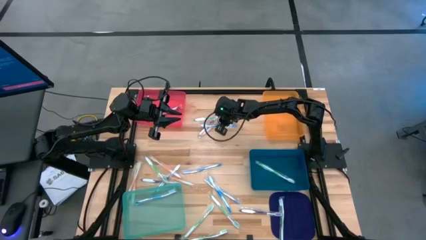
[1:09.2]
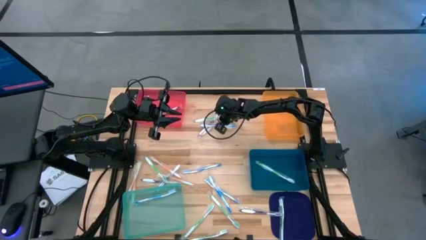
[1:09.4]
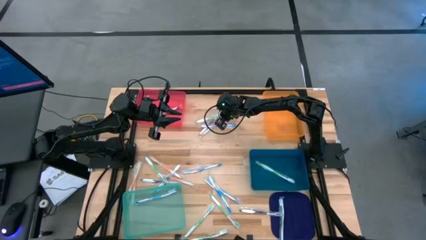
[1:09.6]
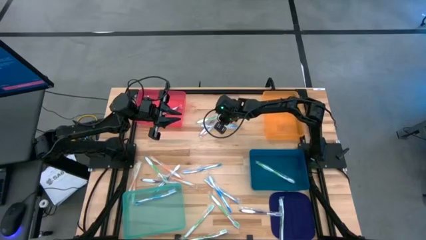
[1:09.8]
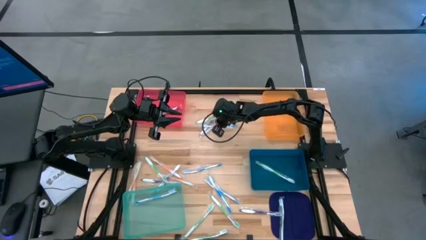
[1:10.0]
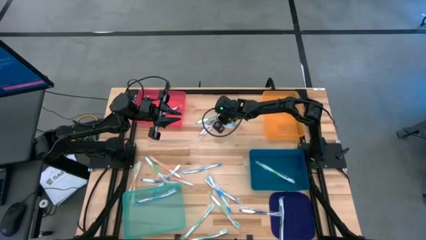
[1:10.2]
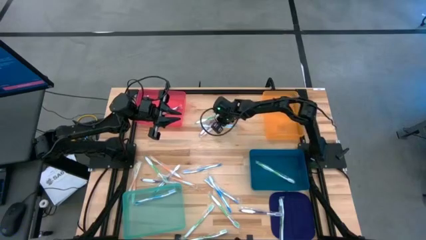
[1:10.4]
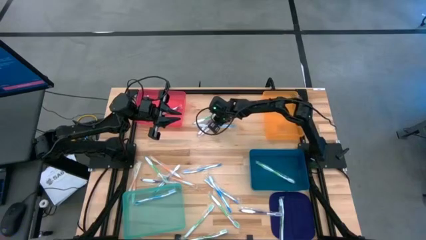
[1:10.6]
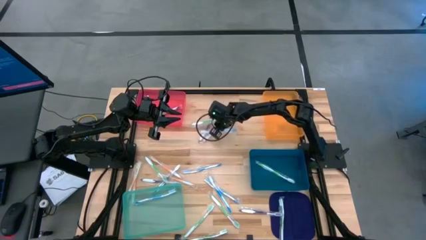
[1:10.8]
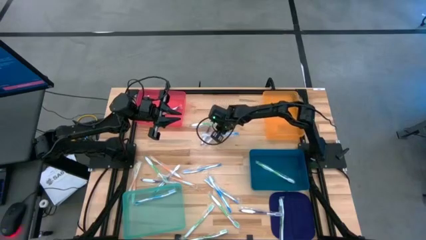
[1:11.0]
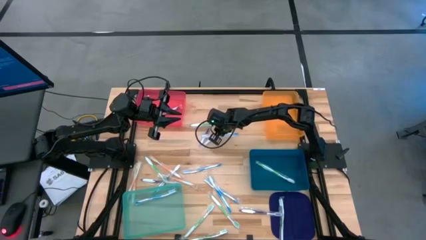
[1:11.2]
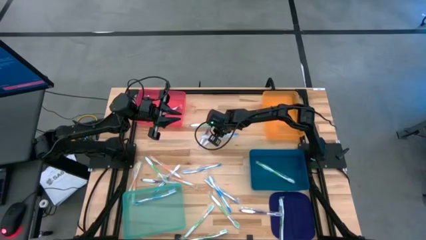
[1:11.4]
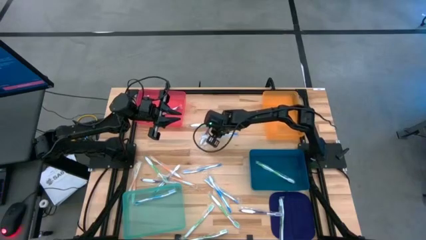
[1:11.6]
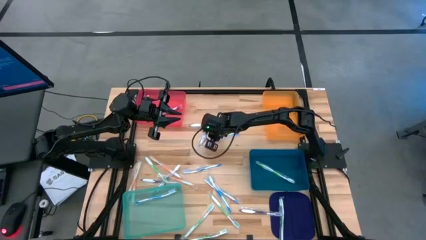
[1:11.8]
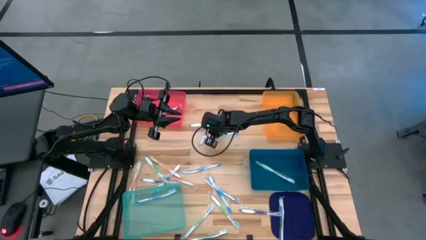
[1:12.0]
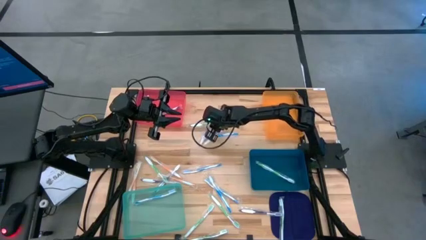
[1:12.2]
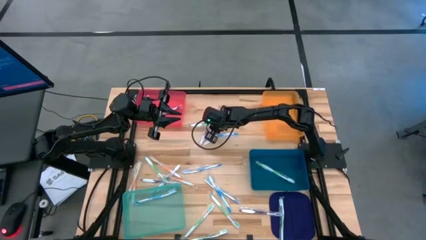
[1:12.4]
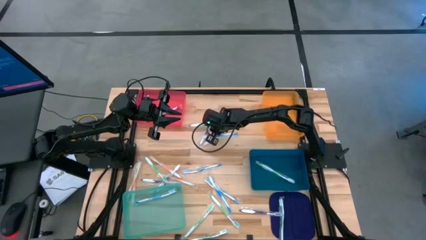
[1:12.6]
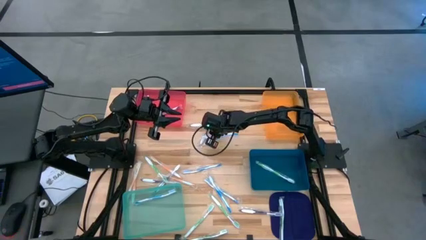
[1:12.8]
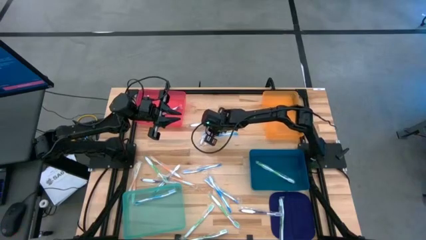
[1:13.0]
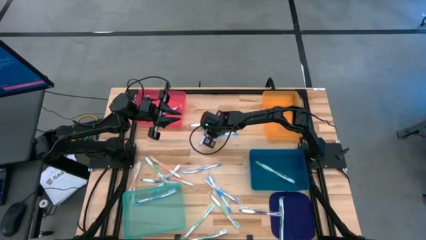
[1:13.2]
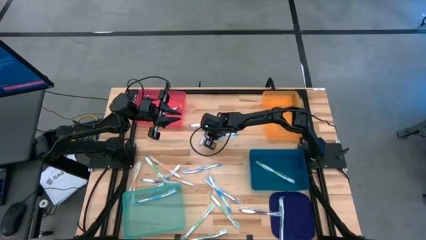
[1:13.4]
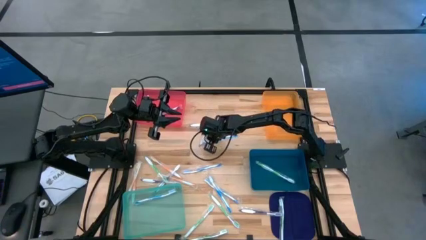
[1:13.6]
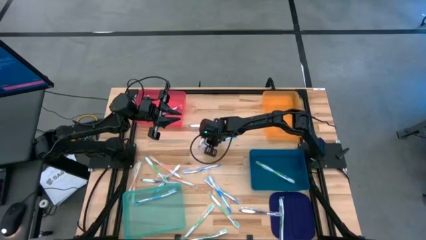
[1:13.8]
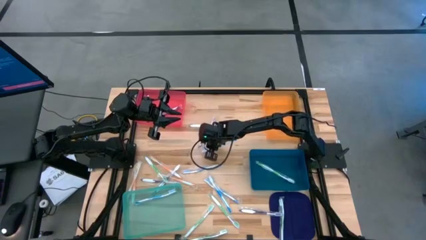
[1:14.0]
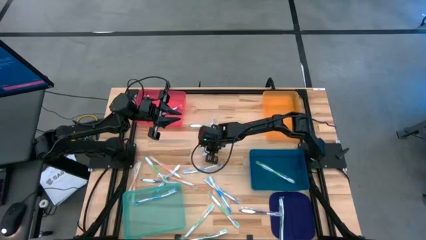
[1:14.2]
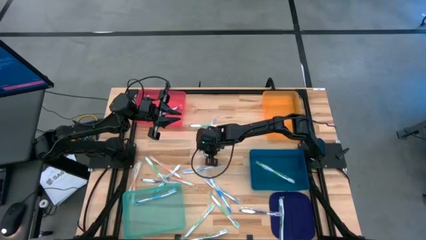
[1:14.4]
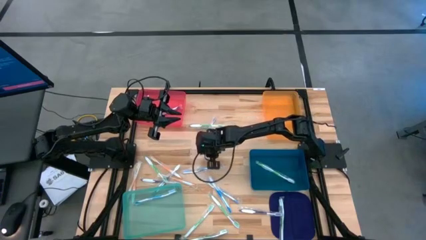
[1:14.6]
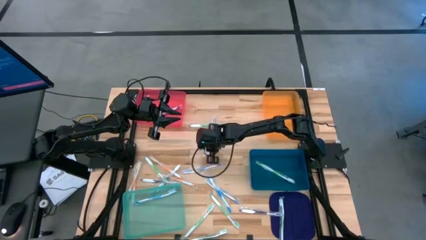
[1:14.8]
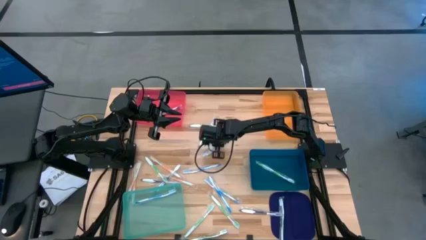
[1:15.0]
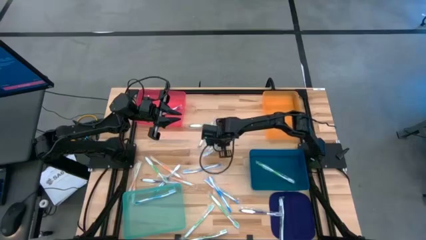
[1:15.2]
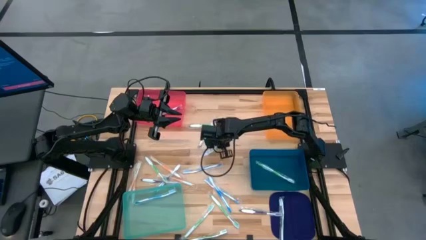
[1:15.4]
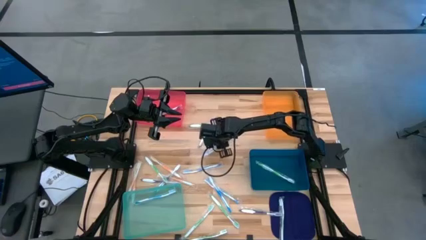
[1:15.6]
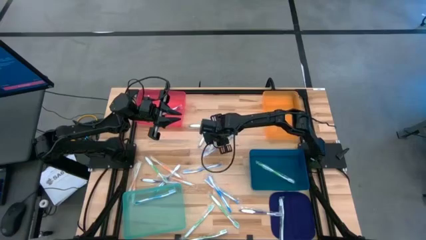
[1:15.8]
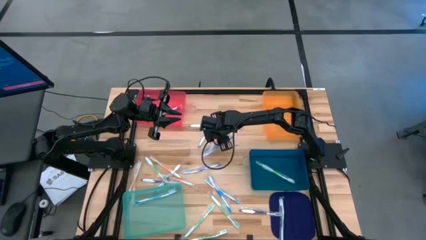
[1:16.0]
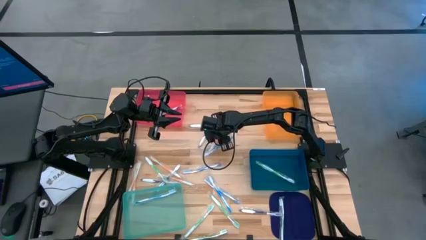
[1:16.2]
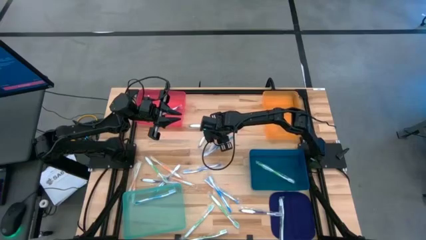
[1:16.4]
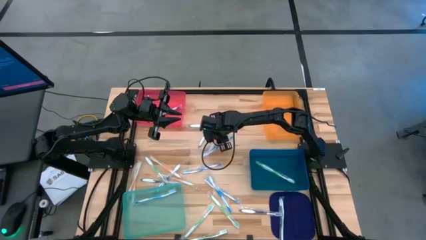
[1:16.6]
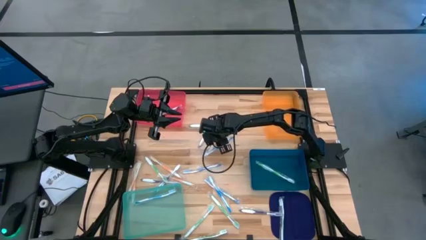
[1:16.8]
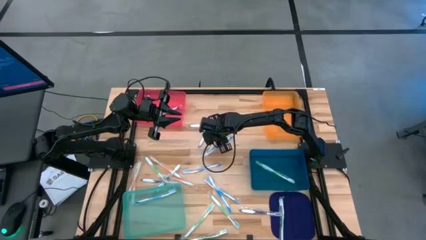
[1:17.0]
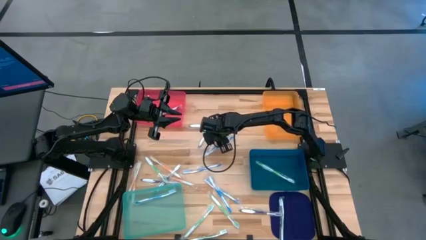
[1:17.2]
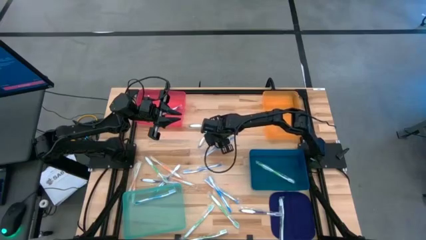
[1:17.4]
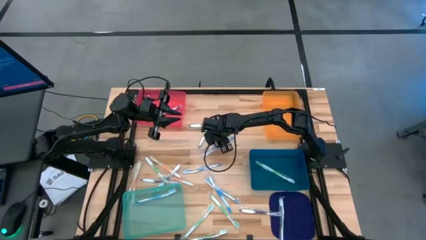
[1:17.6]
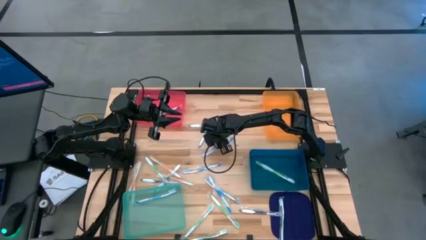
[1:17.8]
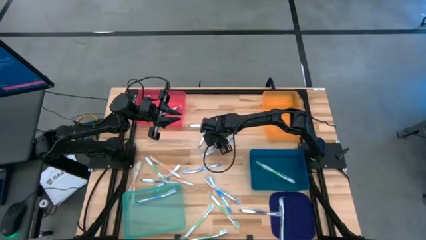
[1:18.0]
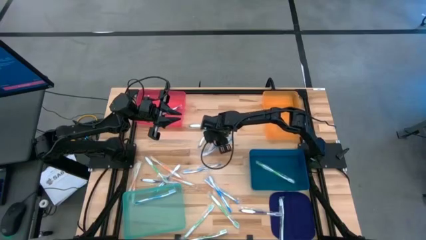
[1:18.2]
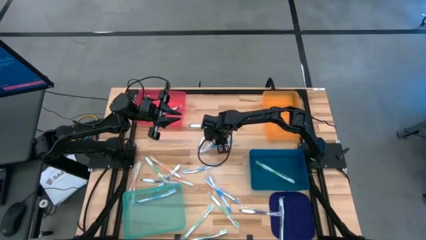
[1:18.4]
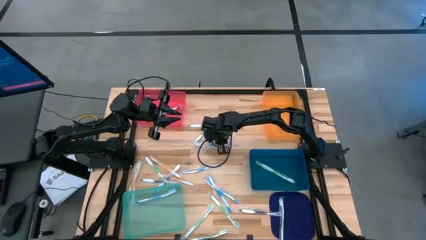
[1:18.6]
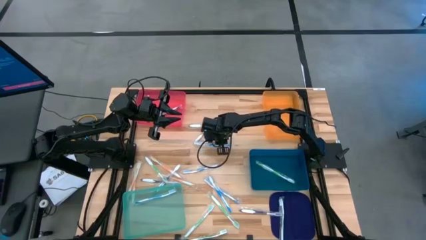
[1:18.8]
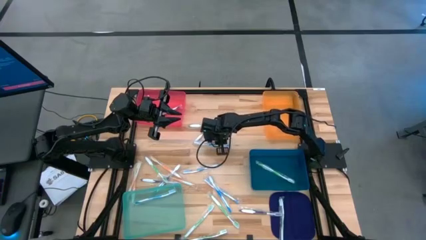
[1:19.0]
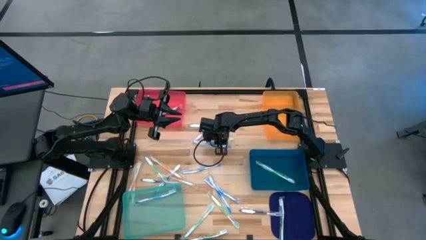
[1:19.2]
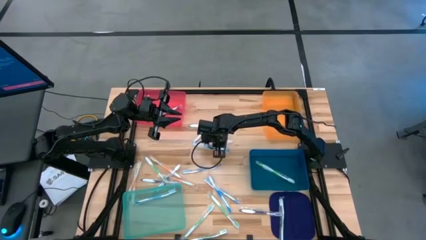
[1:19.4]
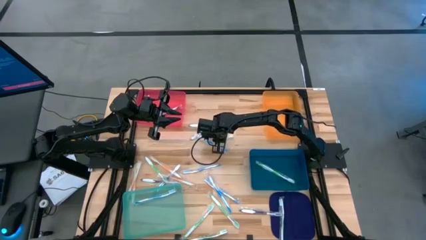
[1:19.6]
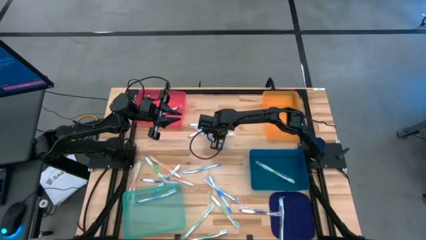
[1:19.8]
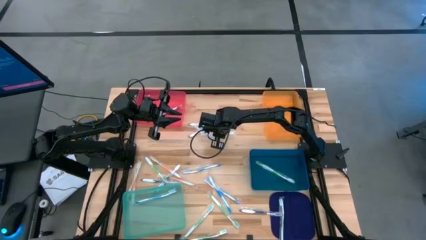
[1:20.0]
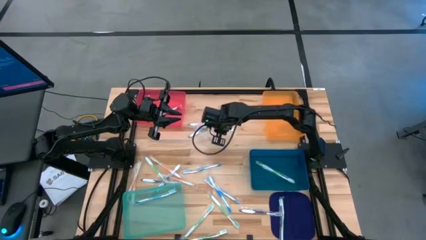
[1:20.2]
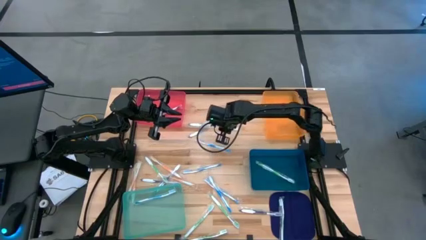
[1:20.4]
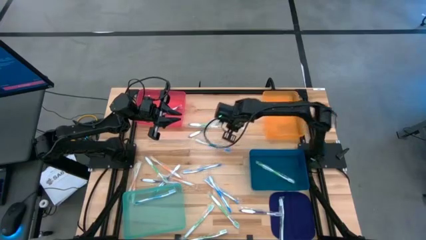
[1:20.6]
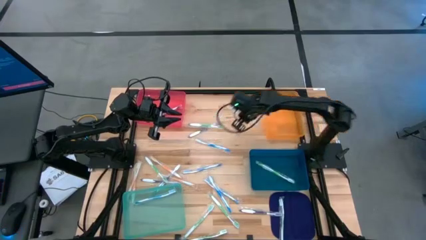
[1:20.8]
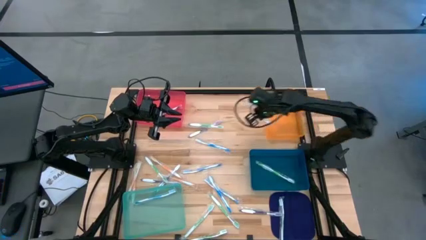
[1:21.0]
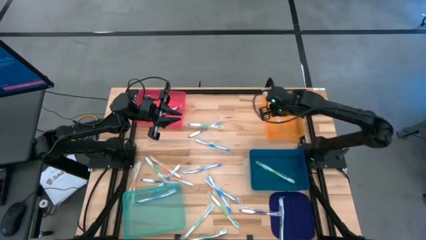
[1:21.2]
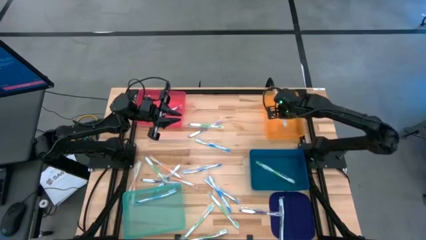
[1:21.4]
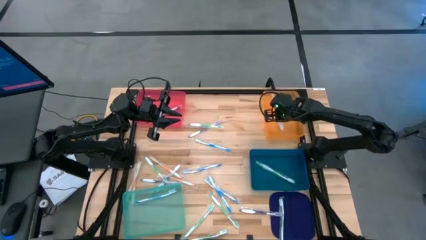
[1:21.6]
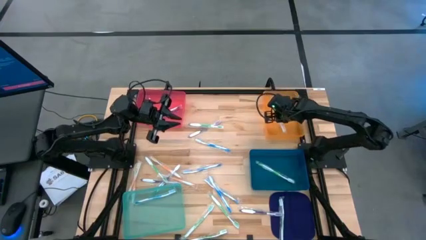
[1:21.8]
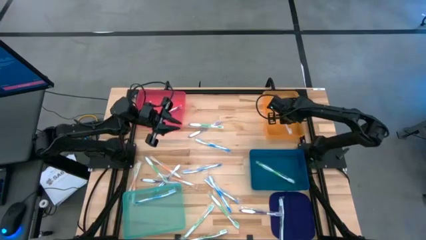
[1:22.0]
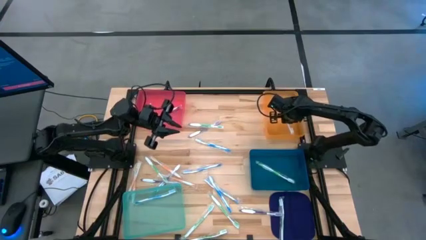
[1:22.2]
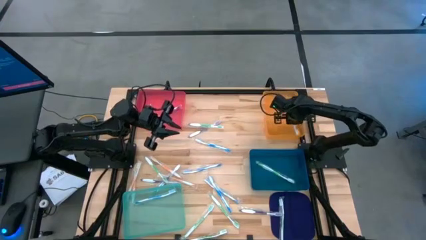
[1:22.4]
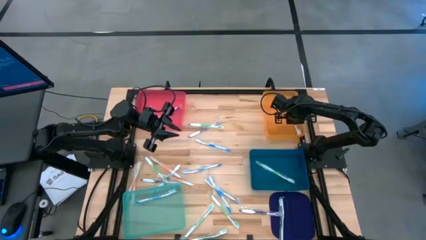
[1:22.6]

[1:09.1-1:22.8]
Task: Pick & Place Toothbrushes
Put the orange toothbrush into the orange bin
